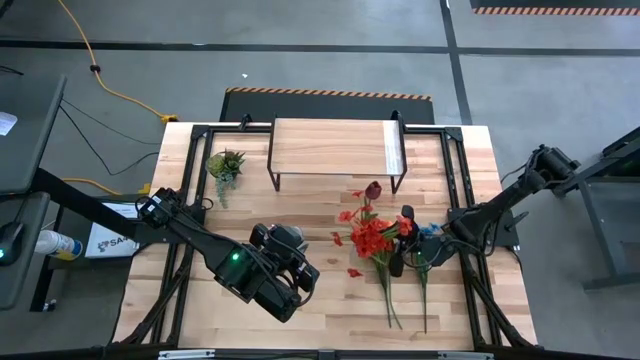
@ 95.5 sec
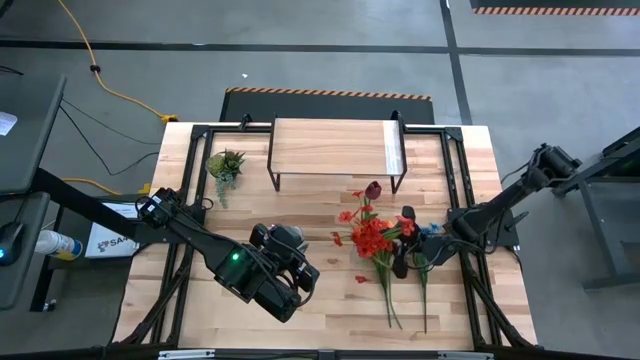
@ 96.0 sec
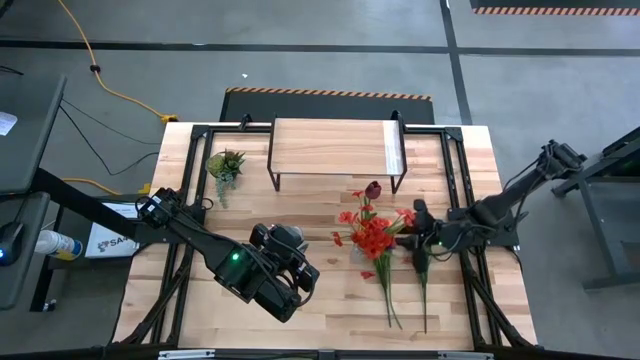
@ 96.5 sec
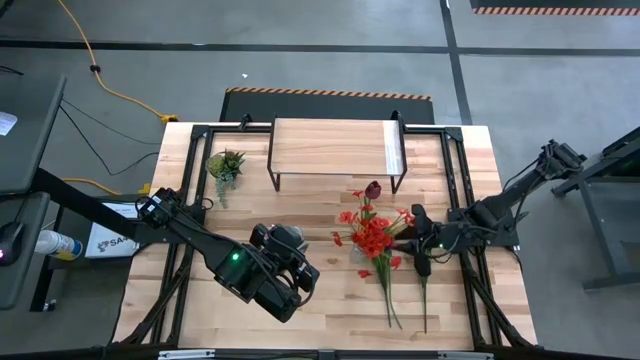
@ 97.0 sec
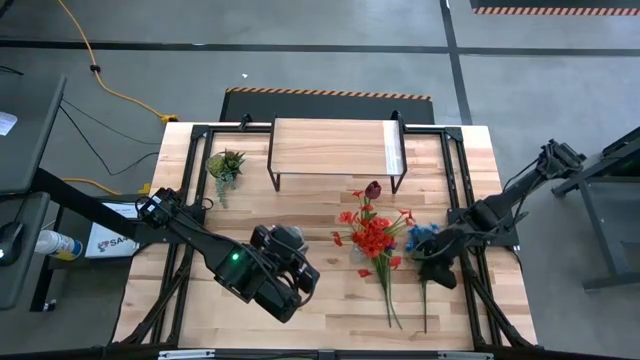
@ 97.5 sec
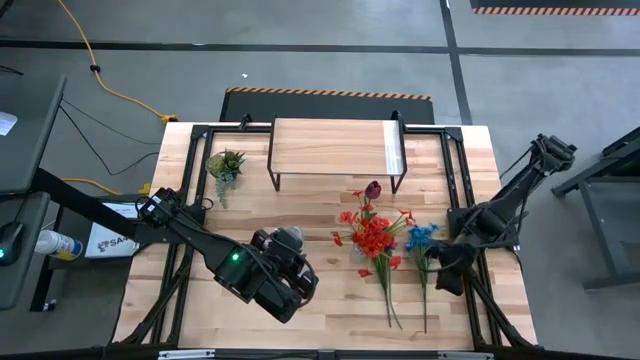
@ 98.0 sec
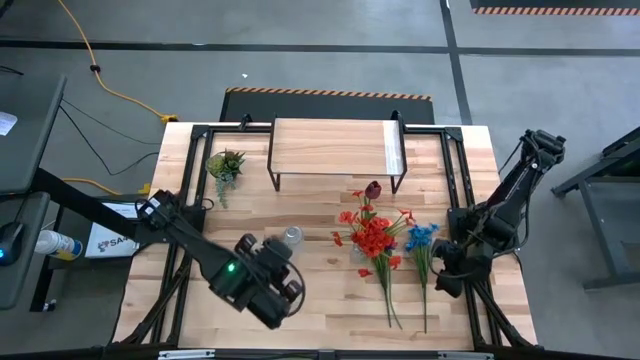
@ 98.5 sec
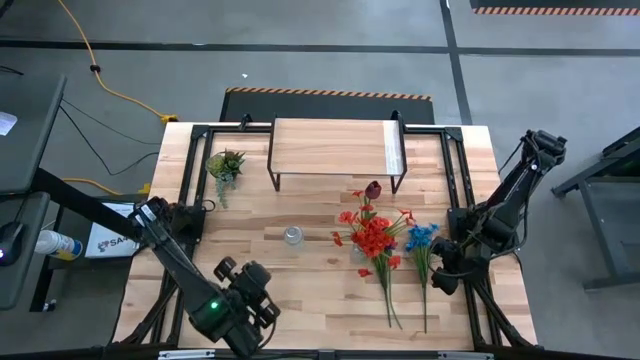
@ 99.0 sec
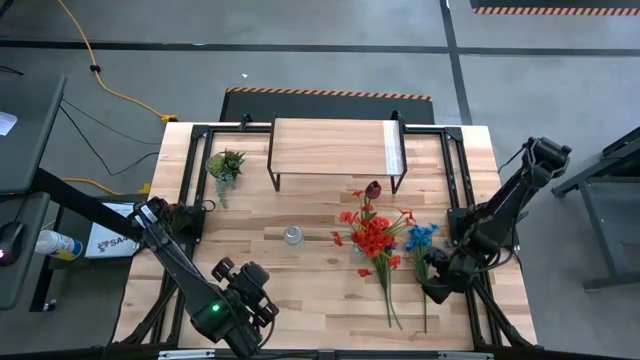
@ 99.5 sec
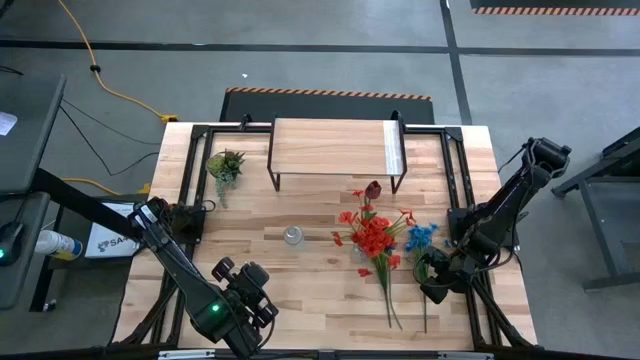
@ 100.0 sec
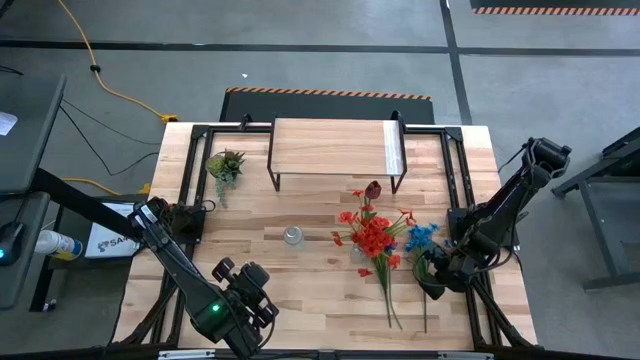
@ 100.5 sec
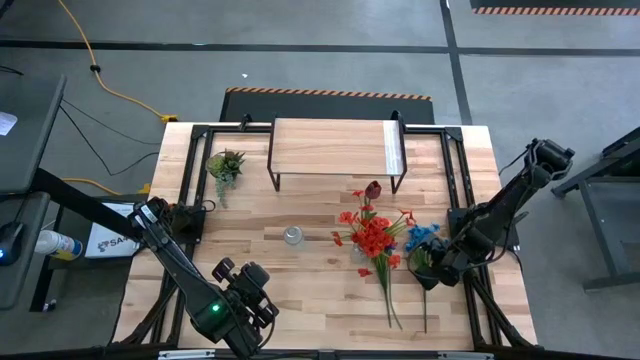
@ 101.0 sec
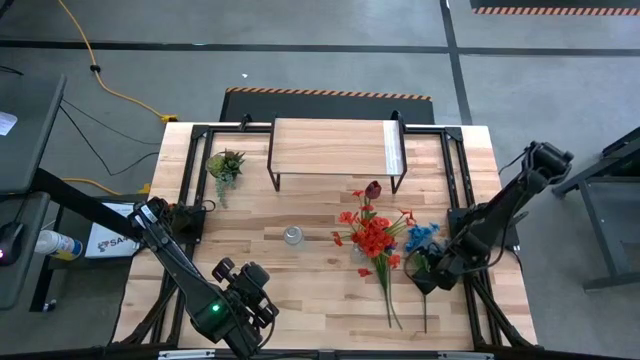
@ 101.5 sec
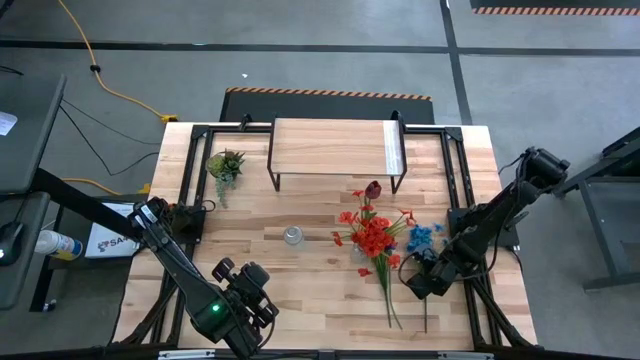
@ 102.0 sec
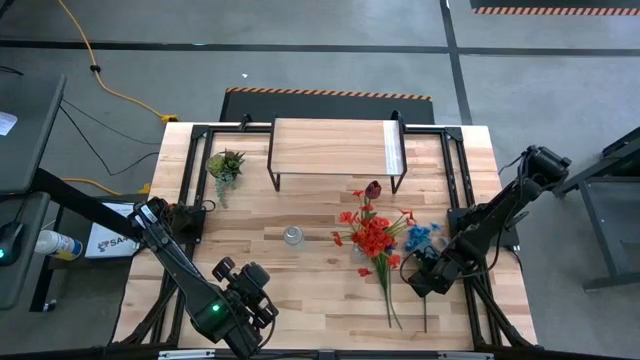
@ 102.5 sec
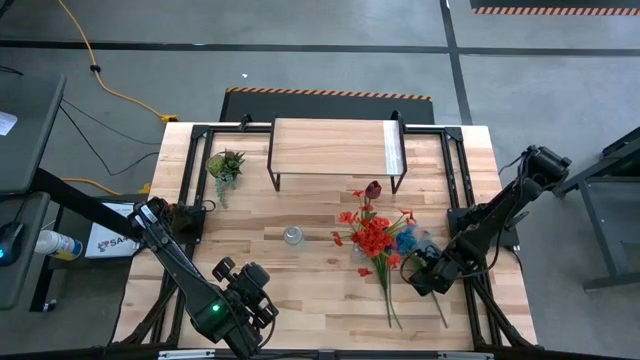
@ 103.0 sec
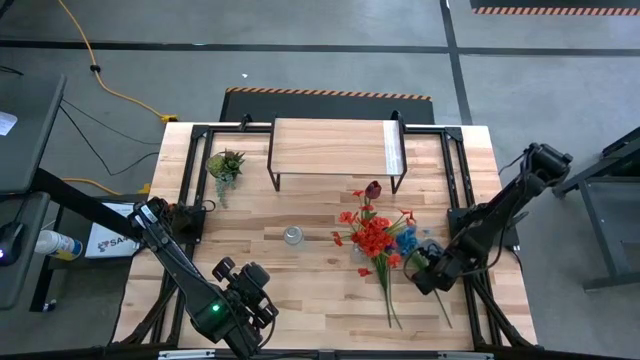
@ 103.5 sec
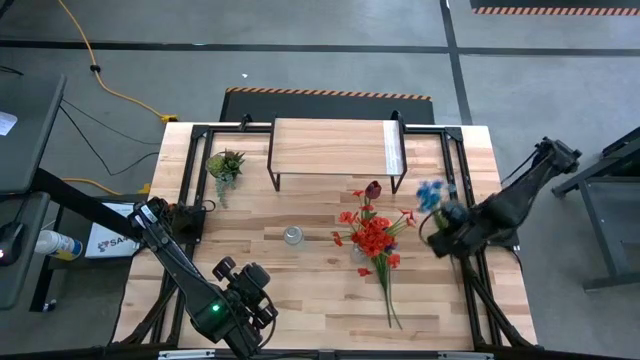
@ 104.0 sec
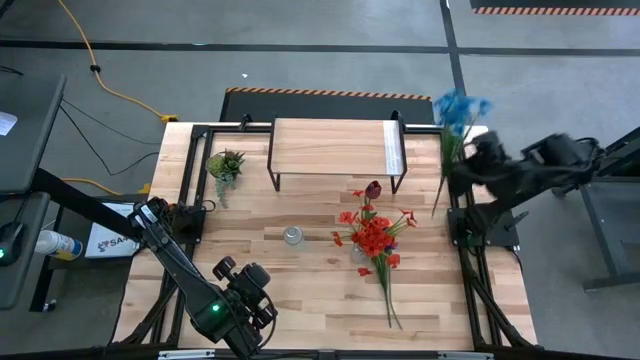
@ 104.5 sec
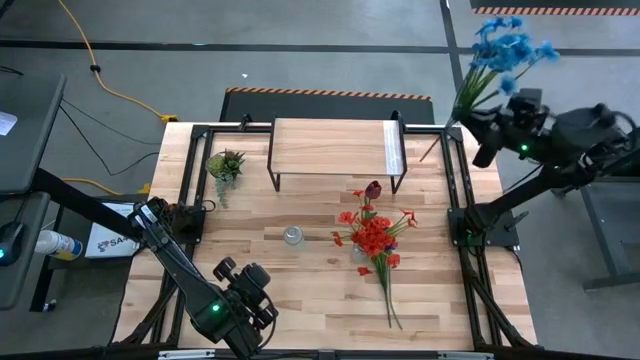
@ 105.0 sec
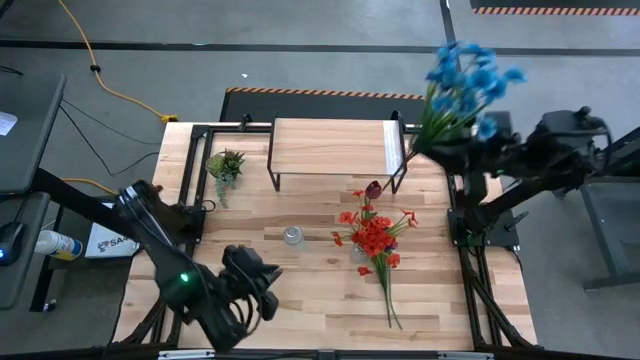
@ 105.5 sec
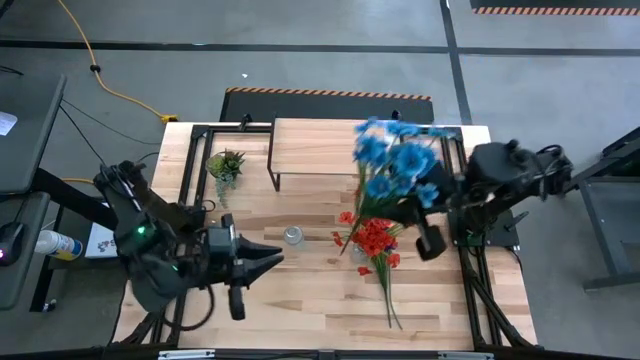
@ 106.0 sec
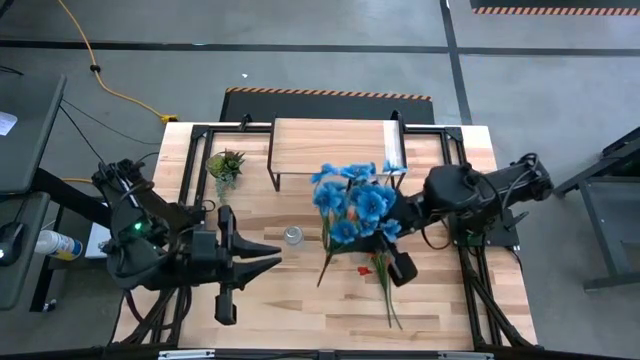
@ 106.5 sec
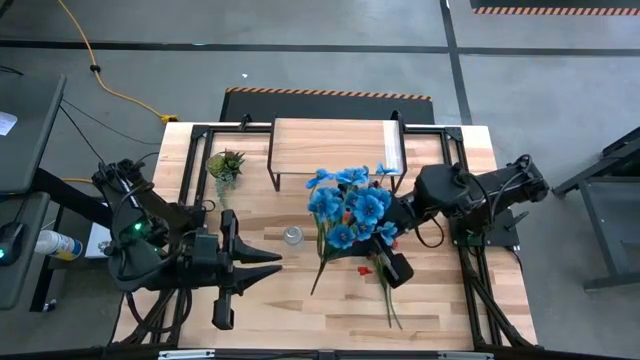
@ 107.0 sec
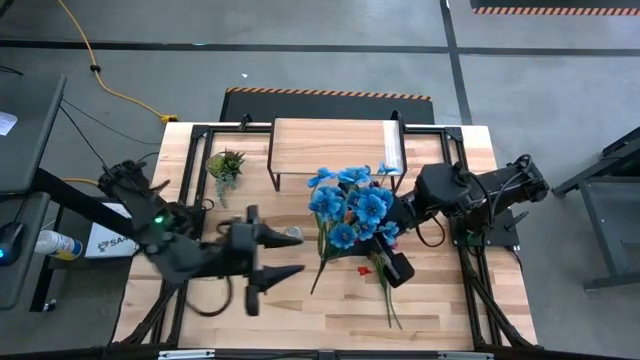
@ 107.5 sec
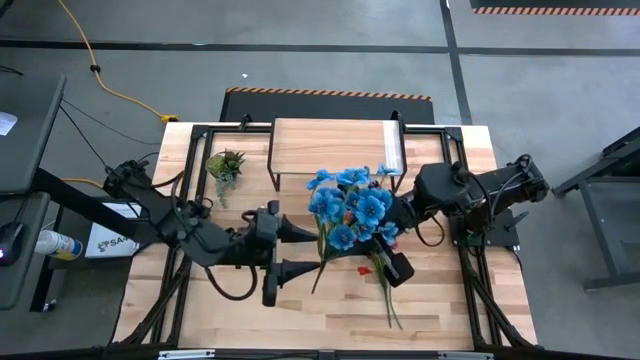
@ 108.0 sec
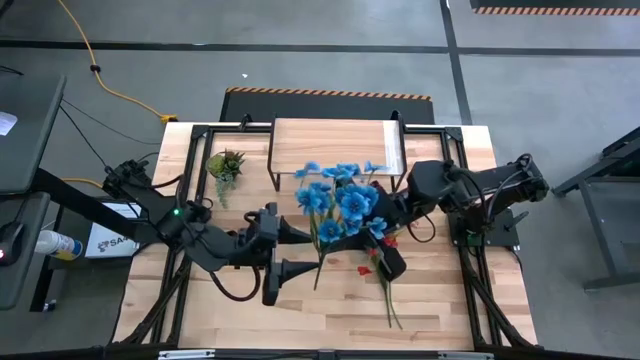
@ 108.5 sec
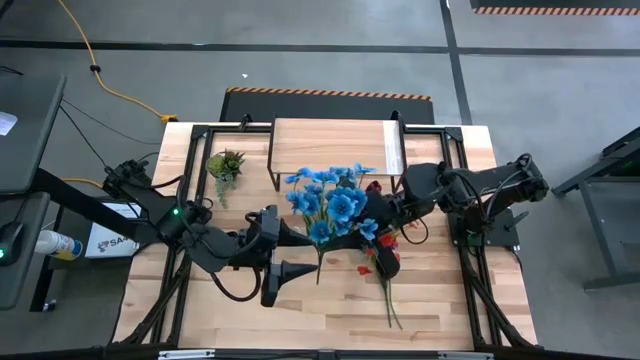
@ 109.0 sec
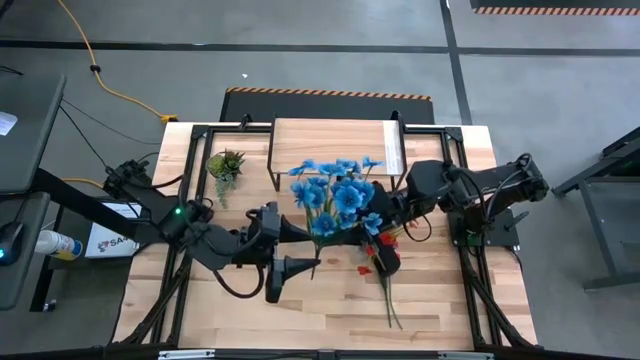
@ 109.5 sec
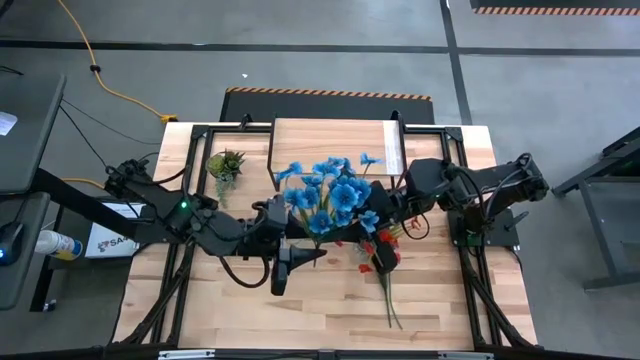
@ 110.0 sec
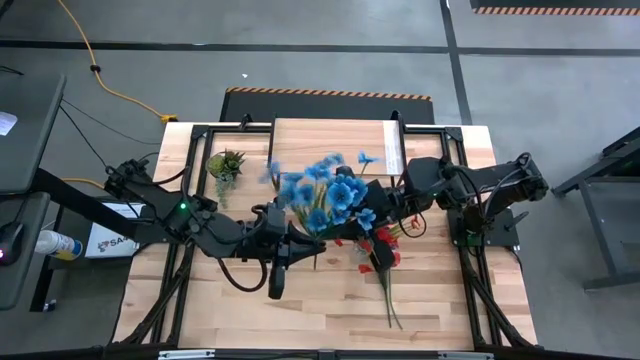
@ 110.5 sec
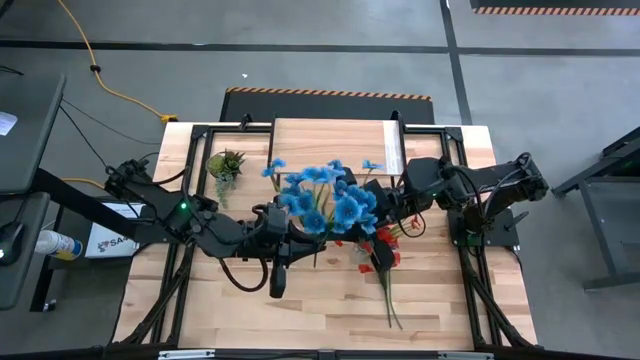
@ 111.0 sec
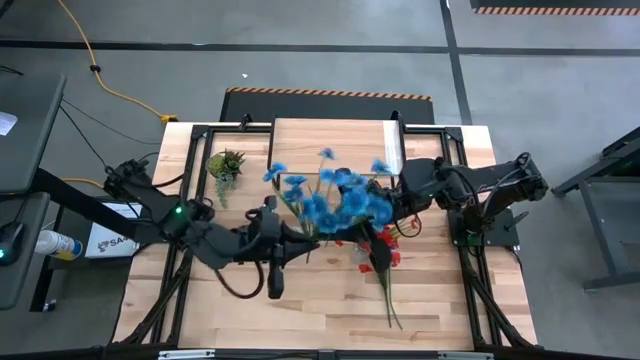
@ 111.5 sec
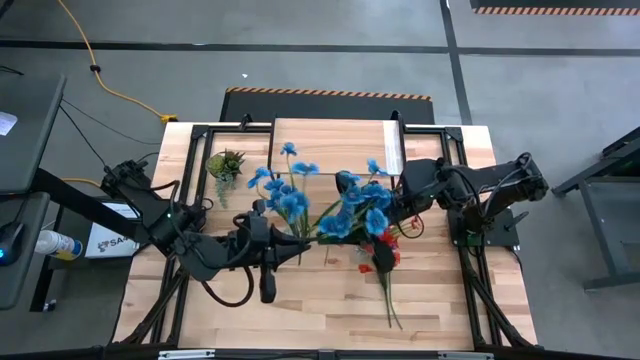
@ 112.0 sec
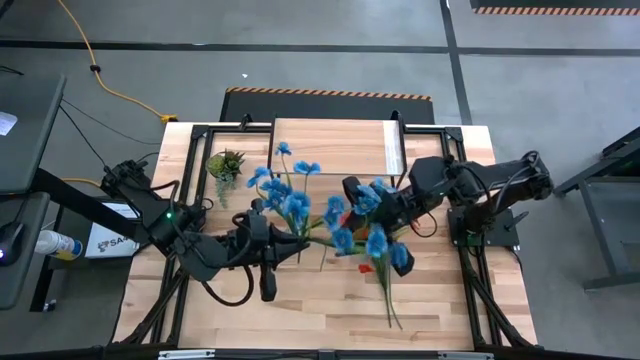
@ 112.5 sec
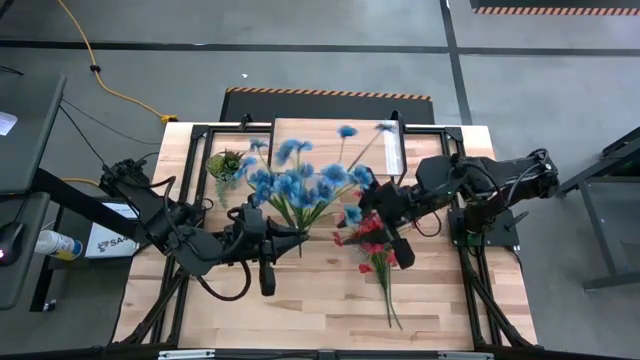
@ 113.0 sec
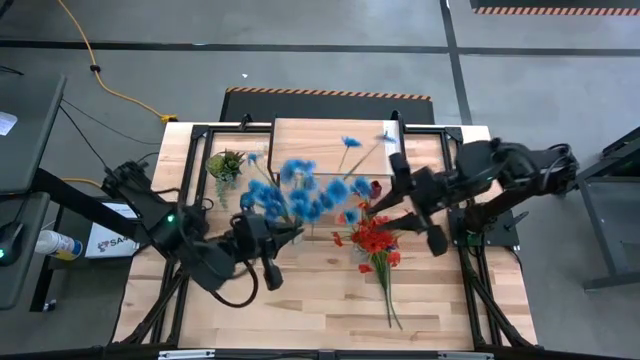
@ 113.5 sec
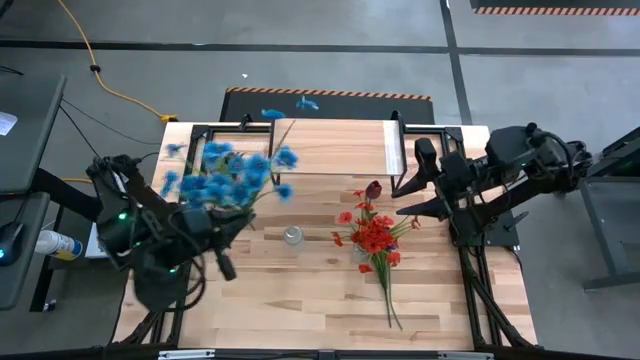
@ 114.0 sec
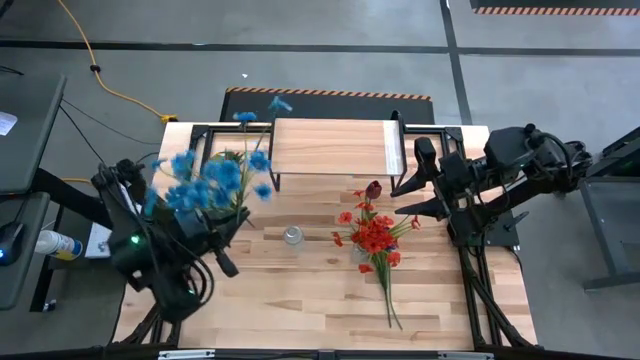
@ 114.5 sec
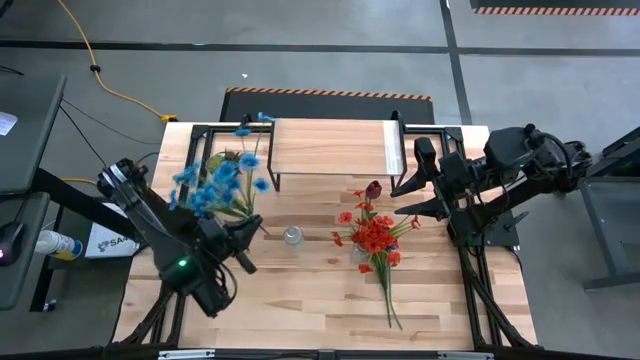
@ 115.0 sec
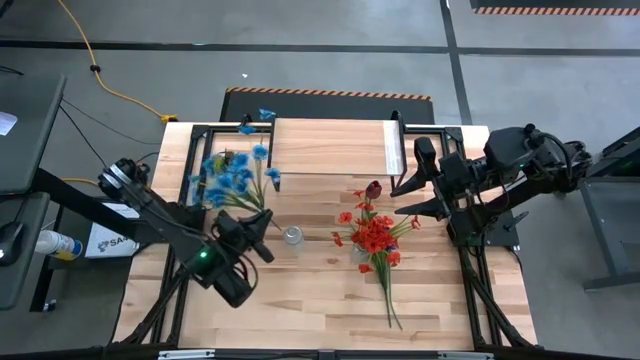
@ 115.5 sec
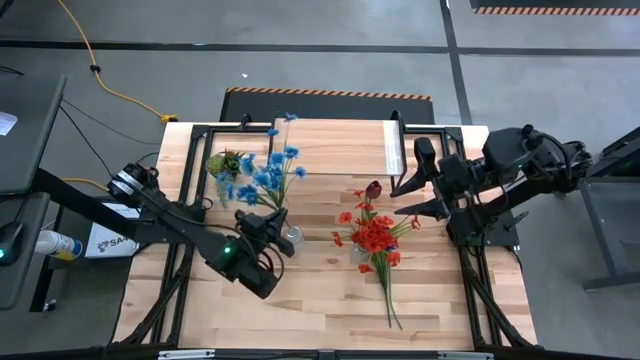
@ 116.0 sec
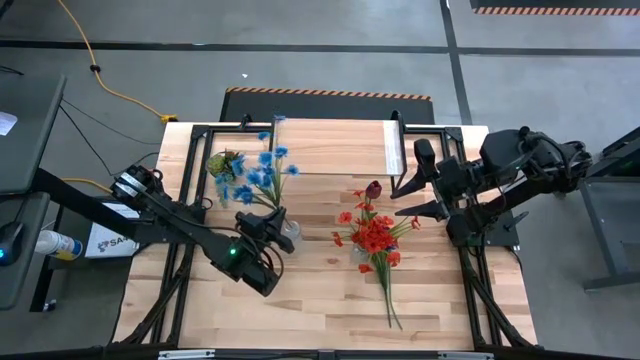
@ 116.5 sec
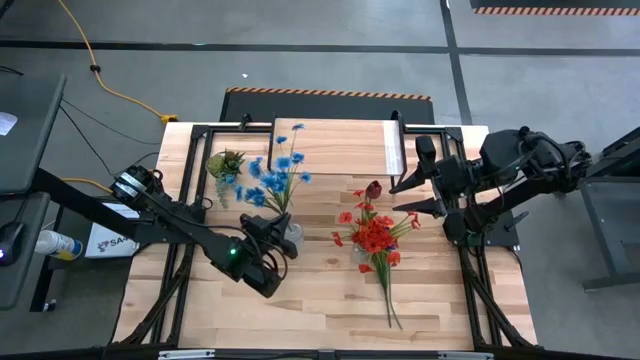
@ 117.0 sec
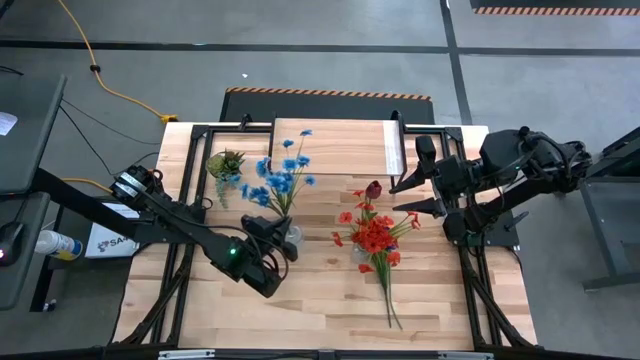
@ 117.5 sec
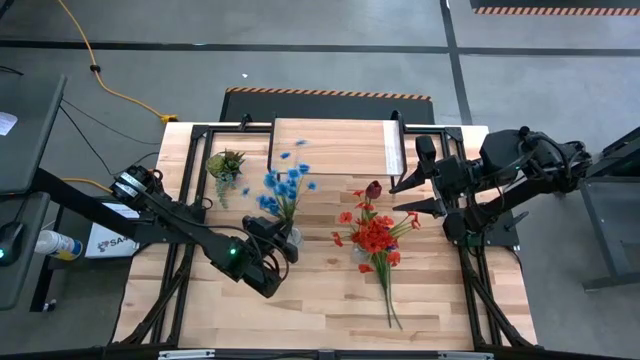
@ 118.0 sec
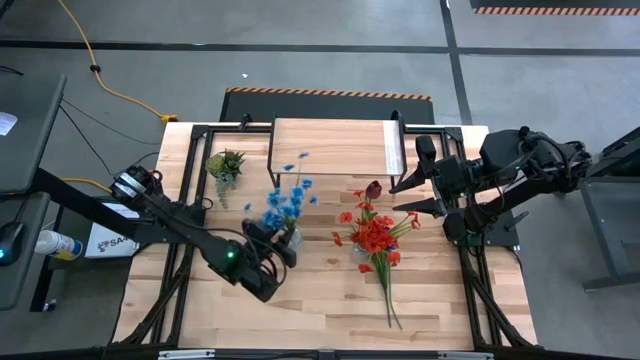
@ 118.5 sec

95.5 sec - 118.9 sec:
Task: Pick and place flowers into a vace then onto a shelf
Put the blue flowers into the left transparent vase
